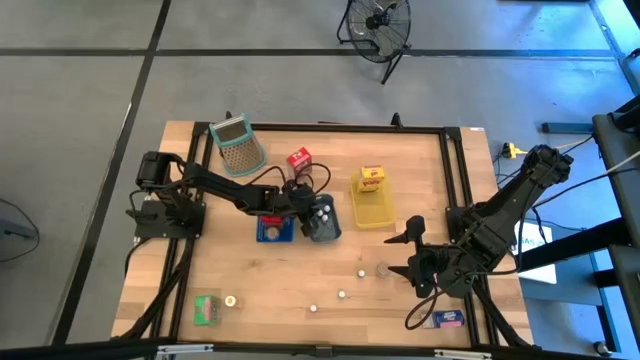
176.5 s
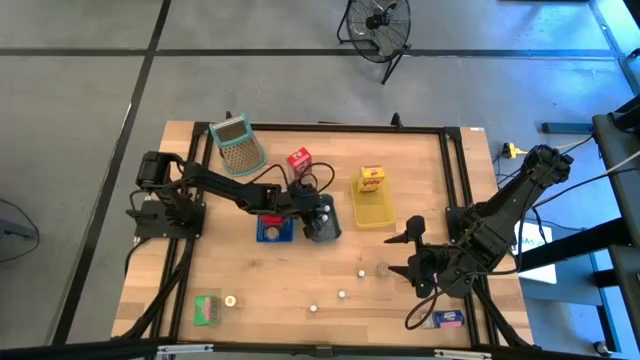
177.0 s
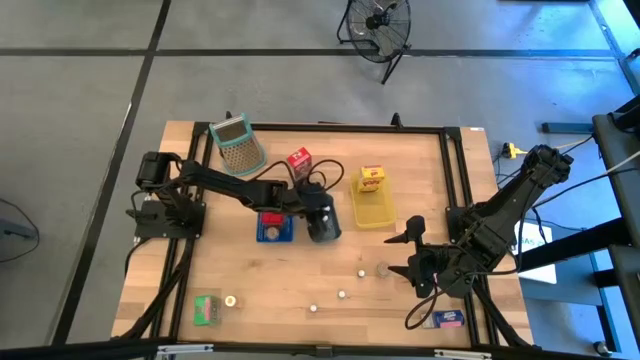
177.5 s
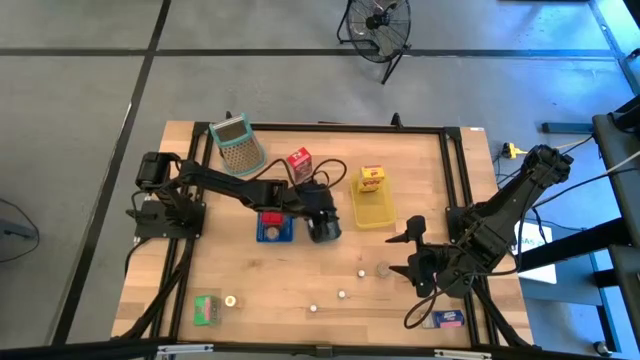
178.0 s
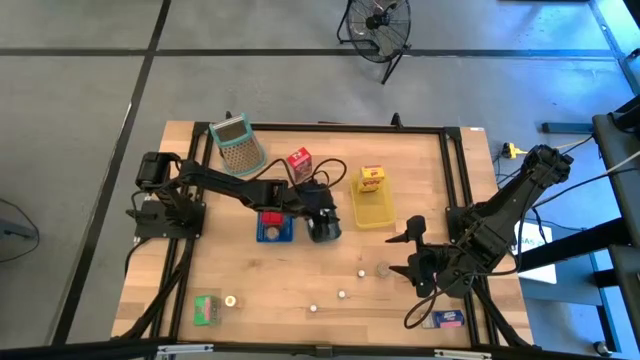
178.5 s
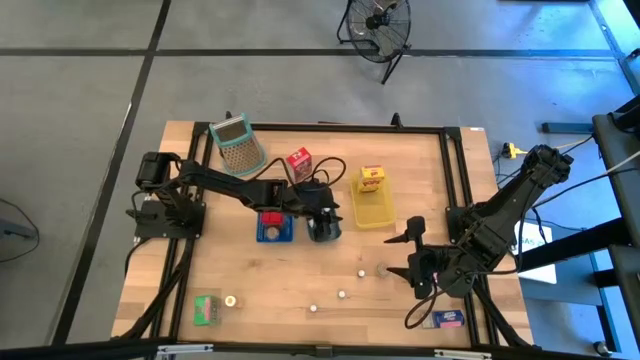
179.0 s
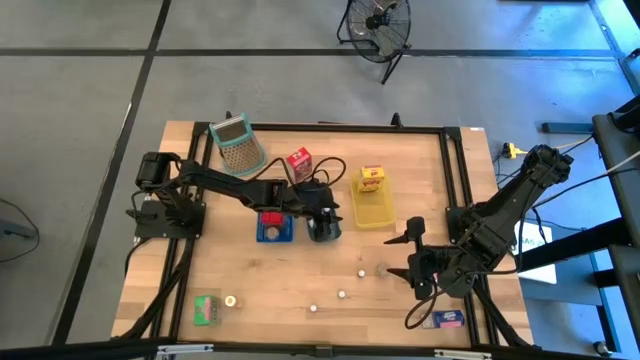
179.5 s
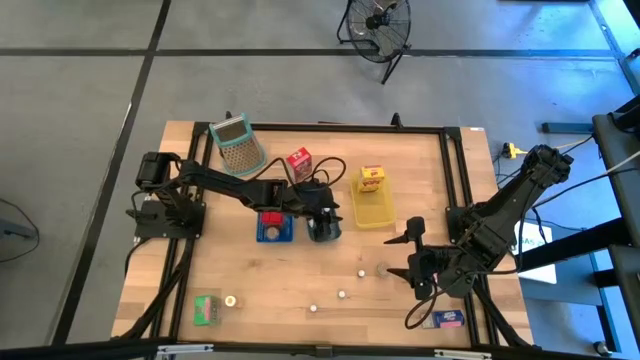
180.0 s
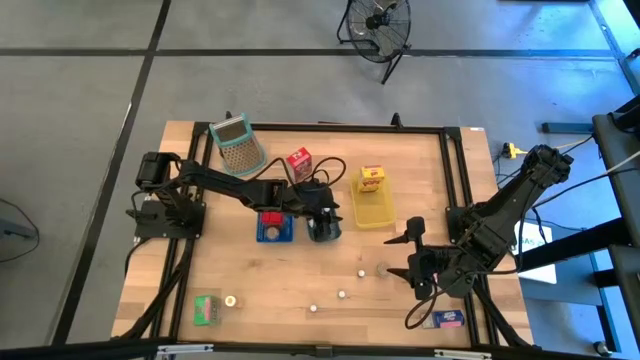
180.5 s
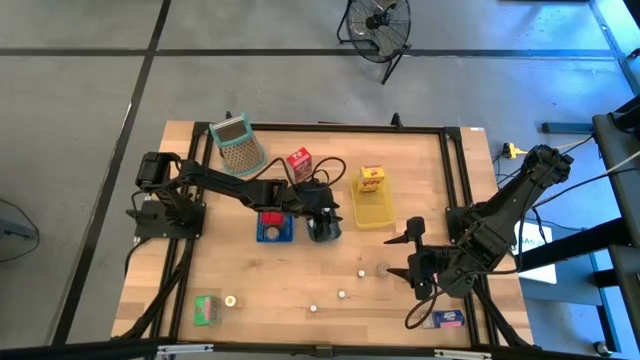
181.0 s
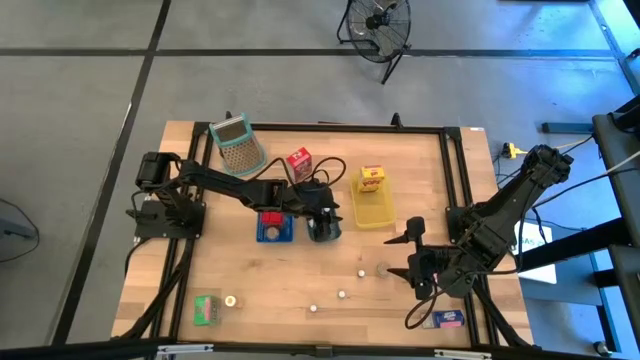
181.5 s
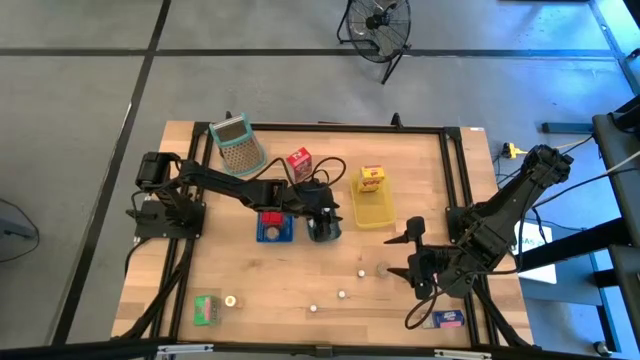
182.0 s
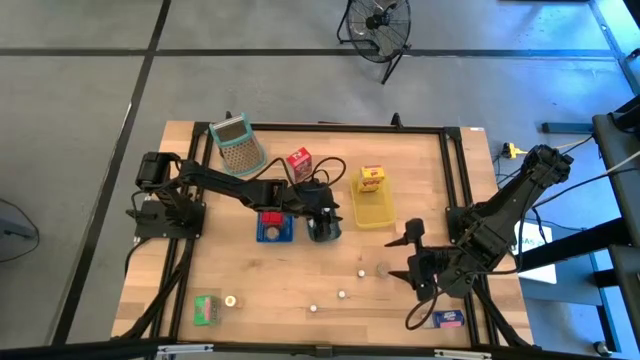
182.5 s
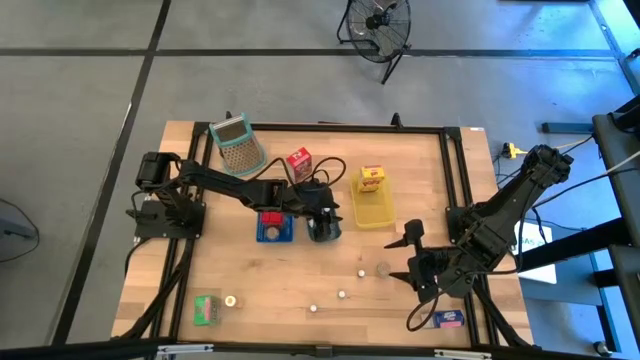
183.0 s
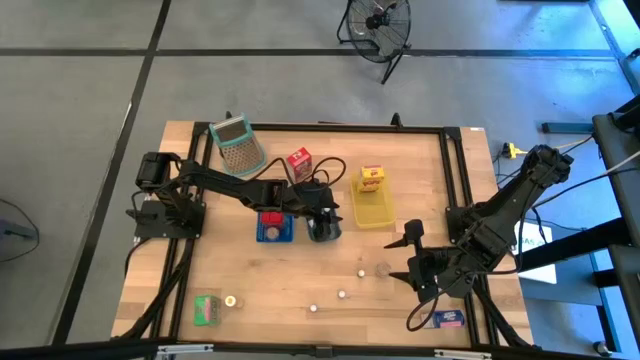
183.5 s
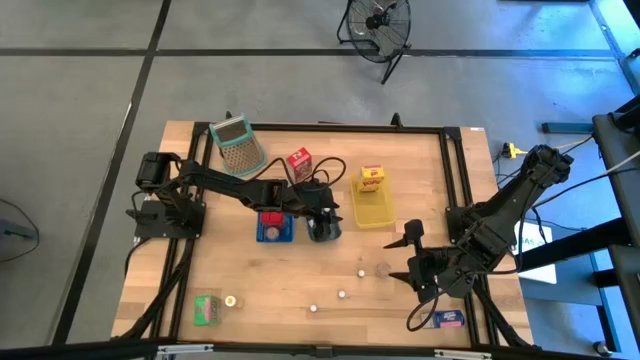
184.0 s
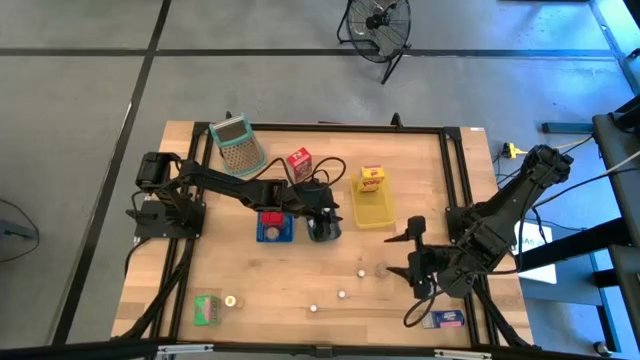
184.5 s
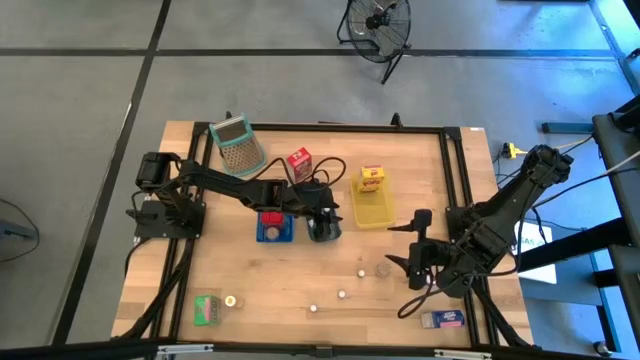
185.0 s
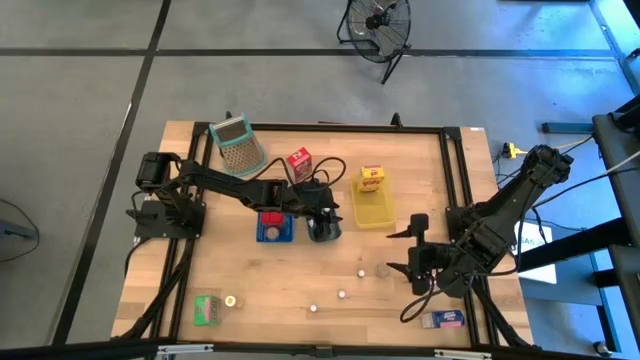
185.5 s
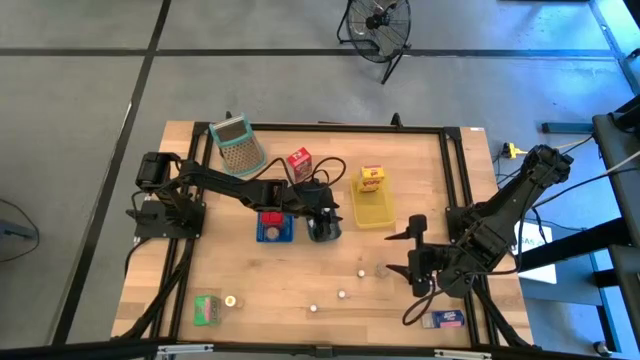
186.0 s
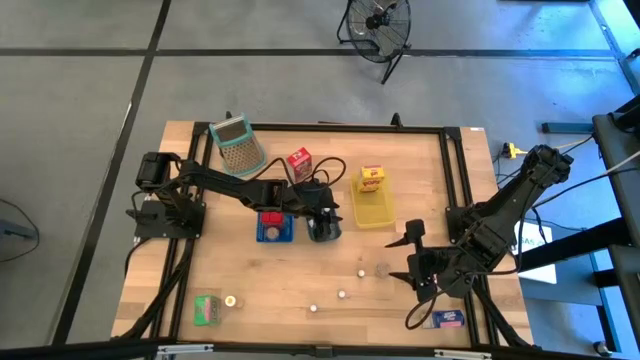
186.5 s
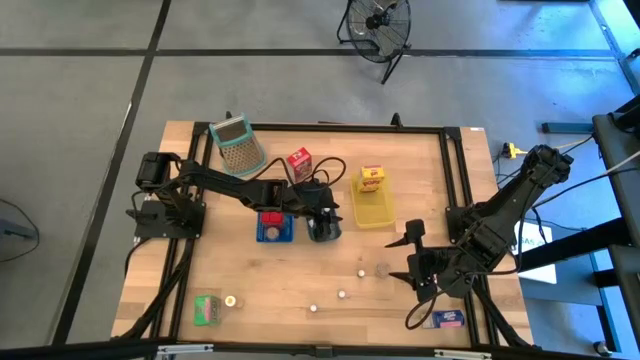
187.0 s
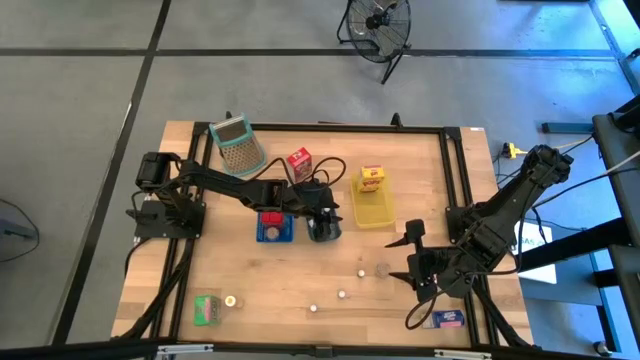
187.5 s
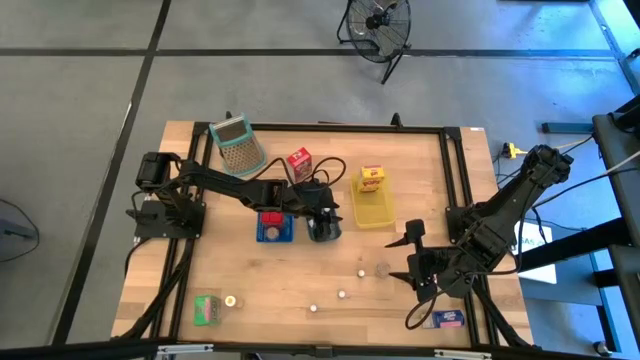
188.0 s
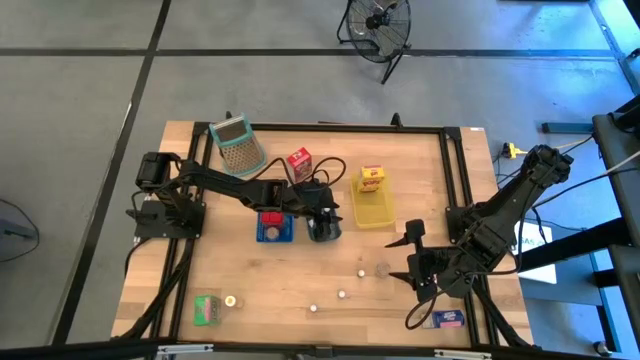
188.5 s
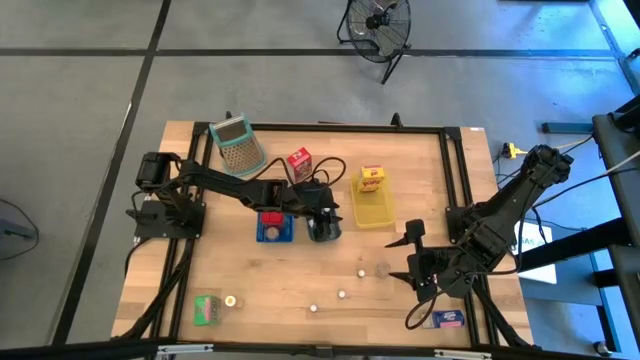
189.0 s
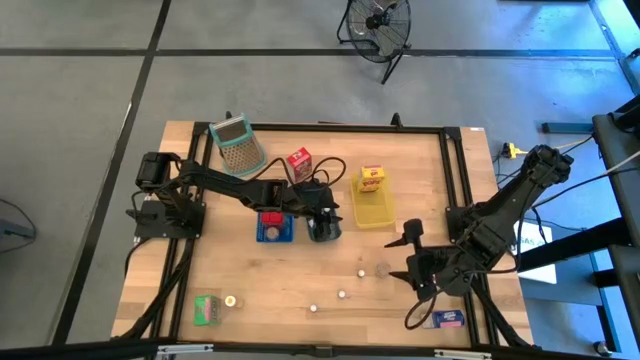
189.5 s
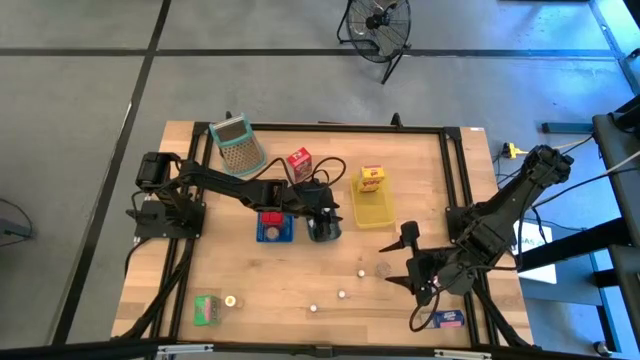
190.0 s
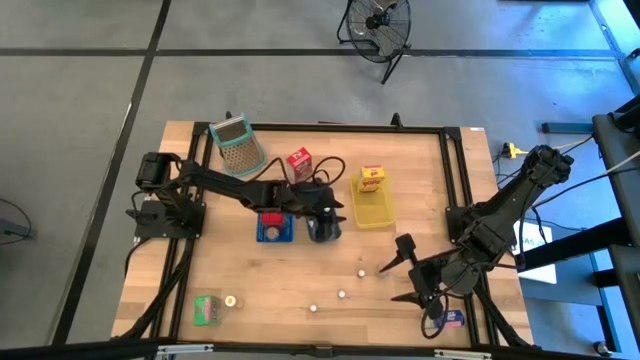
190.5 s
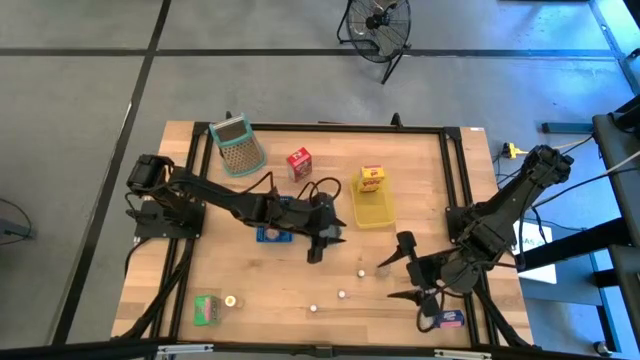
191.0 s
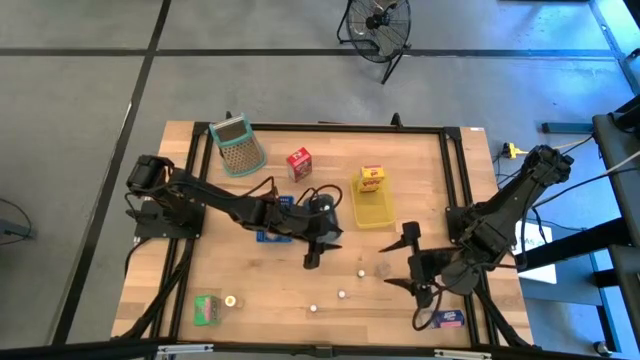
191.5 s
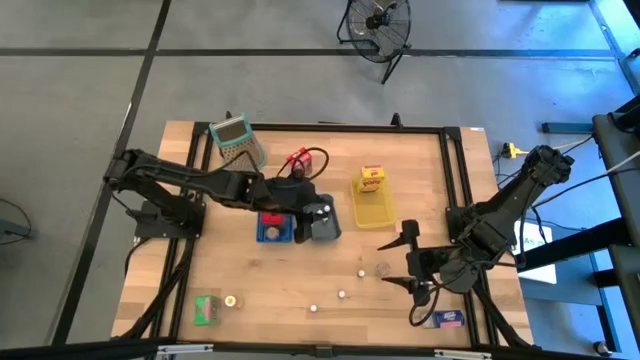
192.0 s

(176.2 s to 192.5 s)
Task: Pick & Place Kitchen Items
Put the red cereal box into the yellow bin

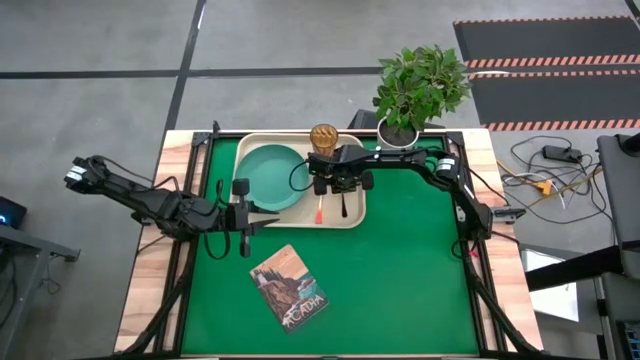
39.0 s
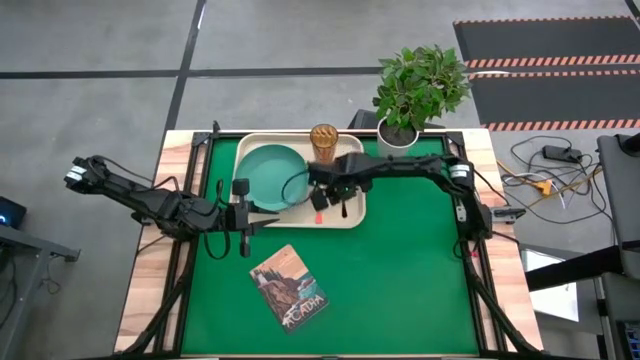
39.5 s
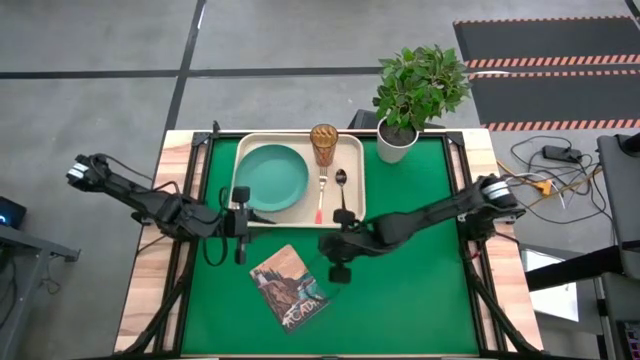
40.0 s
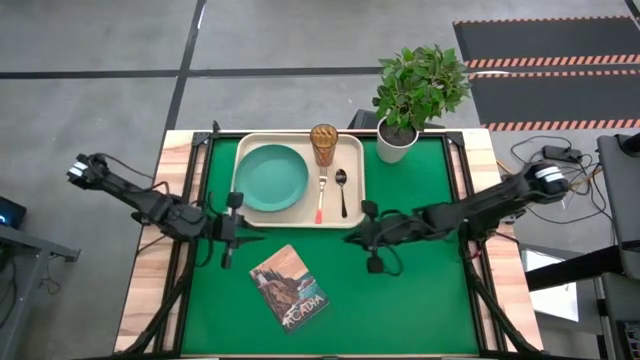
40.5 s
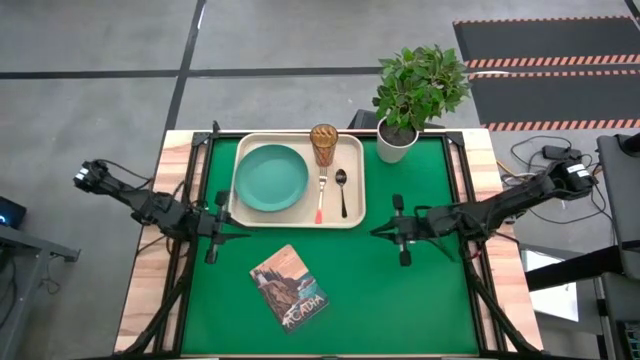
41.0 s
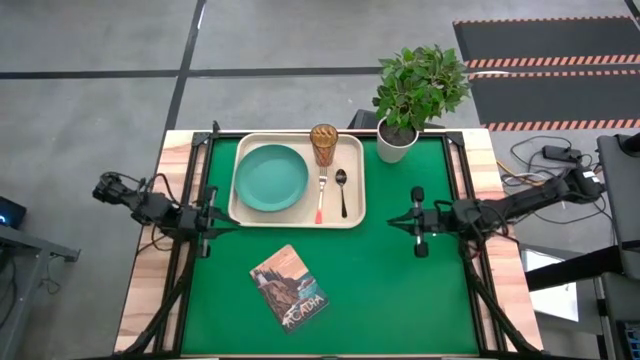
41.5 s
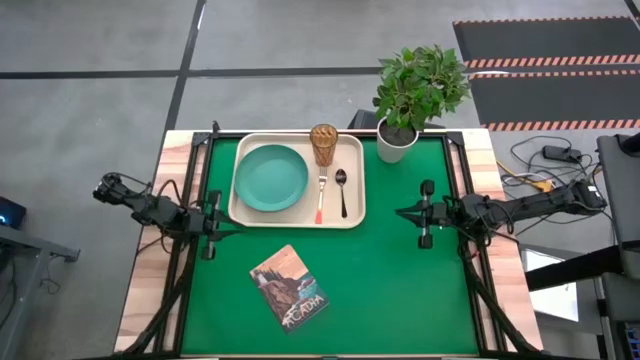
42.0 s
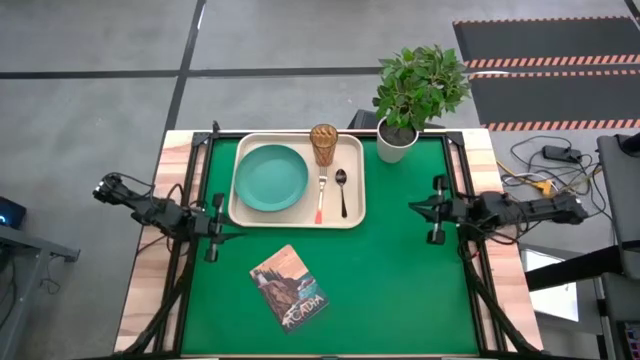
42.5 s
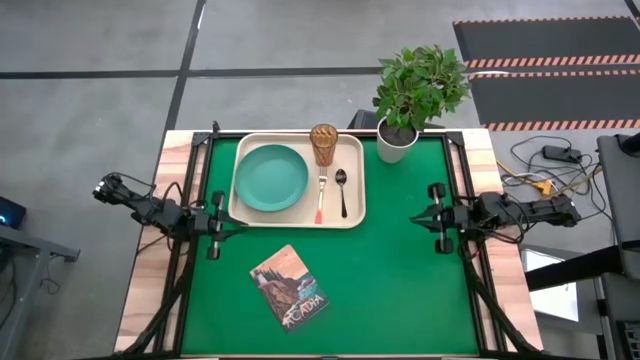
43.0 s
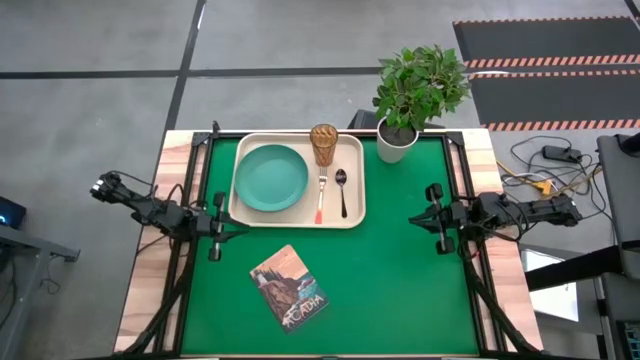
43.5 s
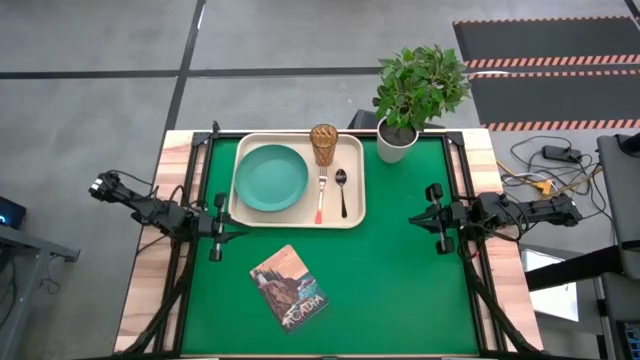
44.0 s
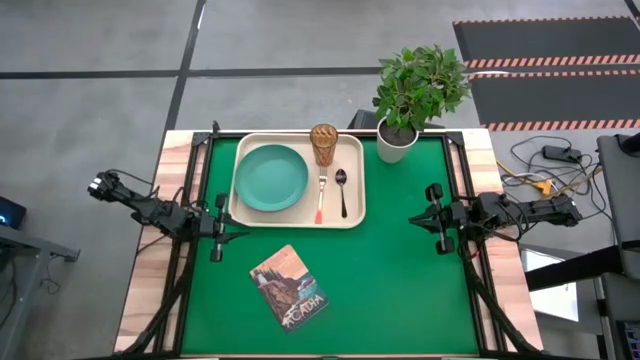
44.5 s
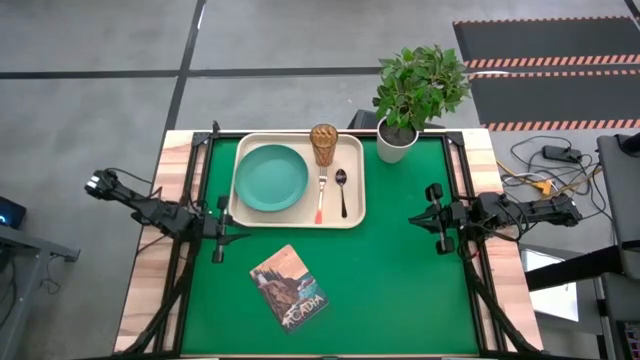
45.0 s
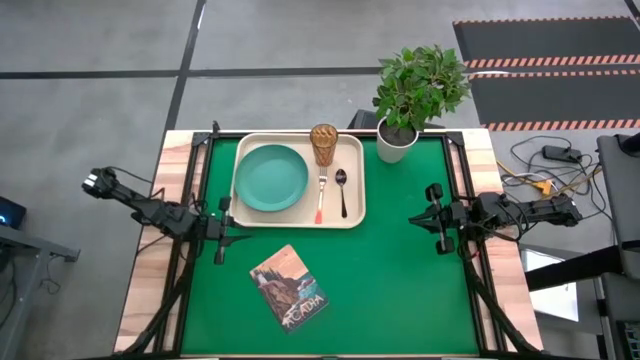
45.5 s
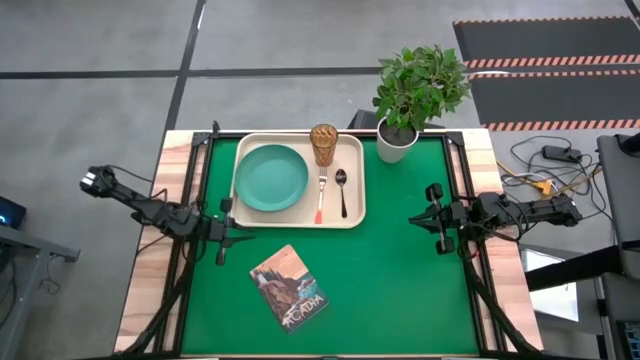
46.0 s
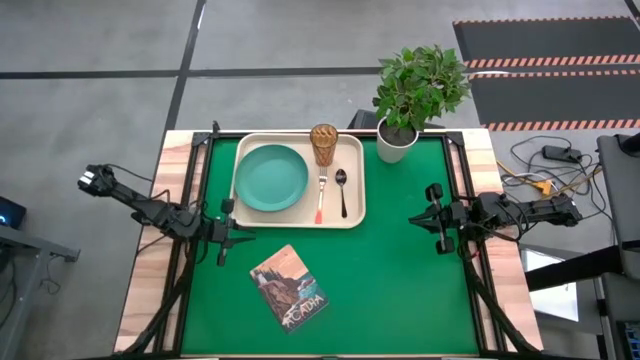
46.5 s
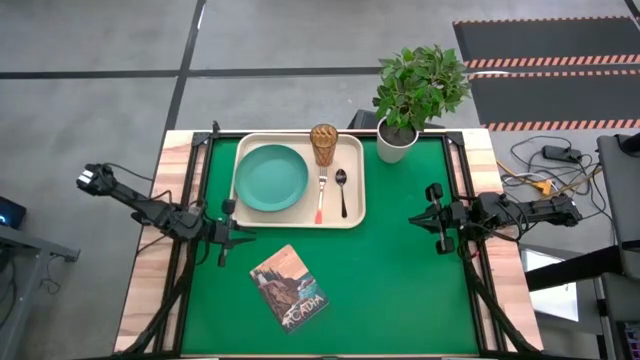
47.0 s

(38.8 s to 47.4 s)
Task: Pick and place plate/cup/fork/spoon on tray
Return to Home Position
